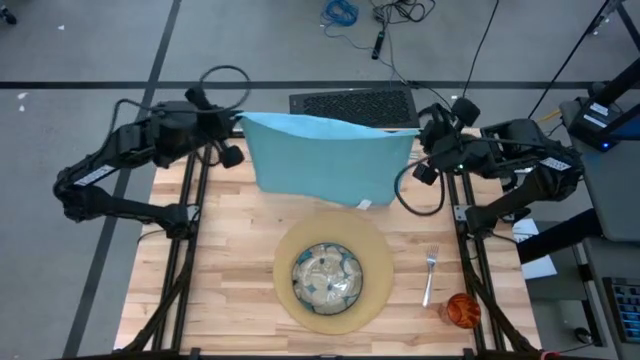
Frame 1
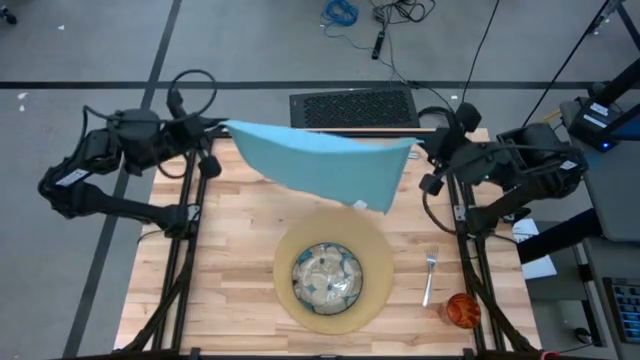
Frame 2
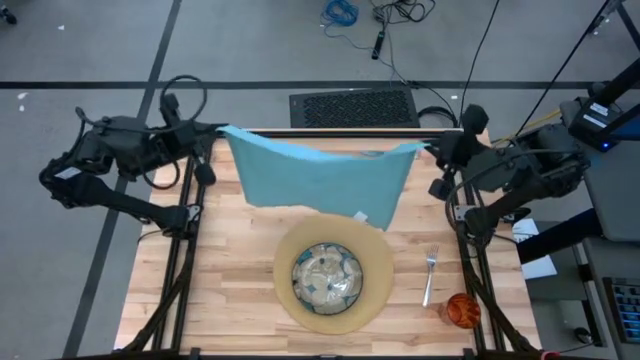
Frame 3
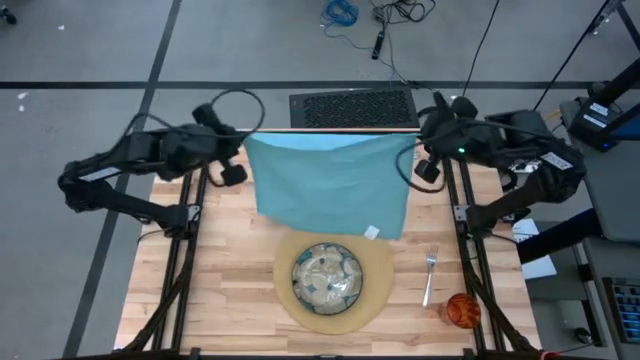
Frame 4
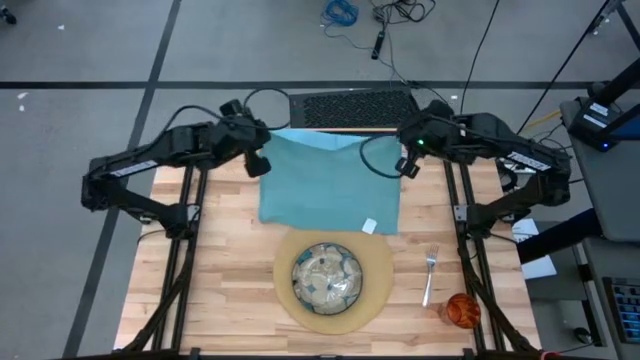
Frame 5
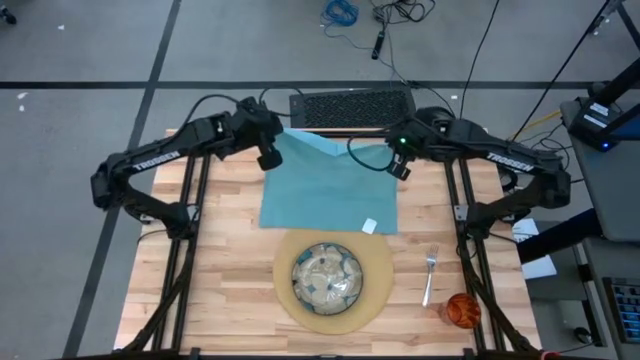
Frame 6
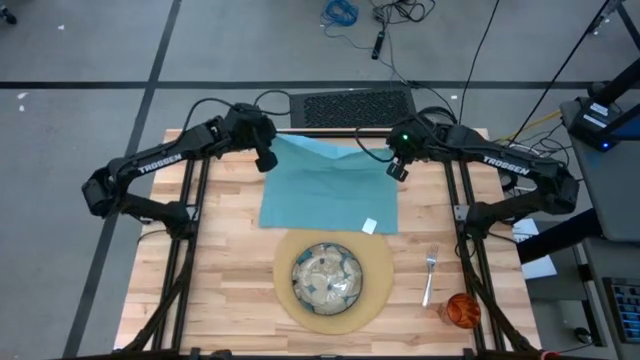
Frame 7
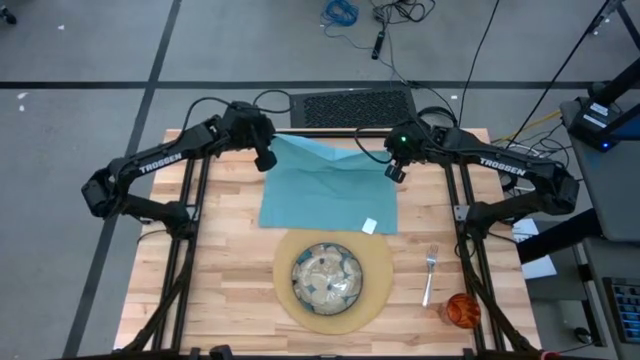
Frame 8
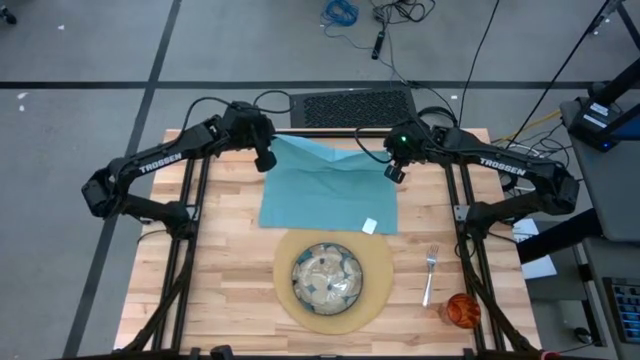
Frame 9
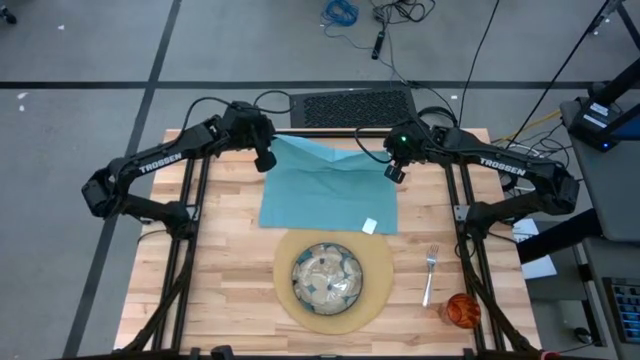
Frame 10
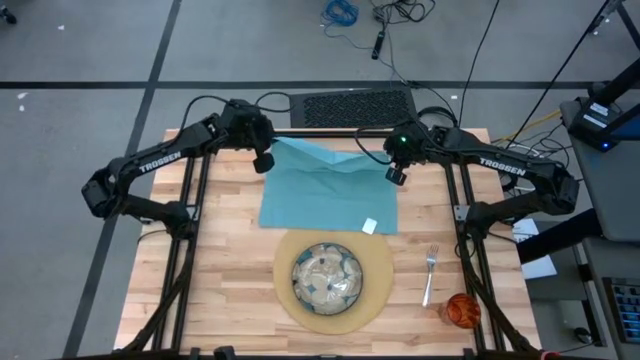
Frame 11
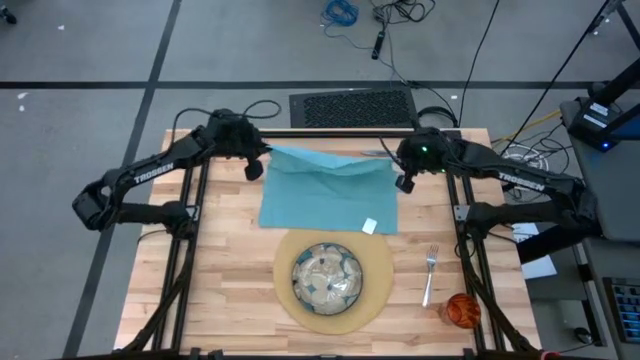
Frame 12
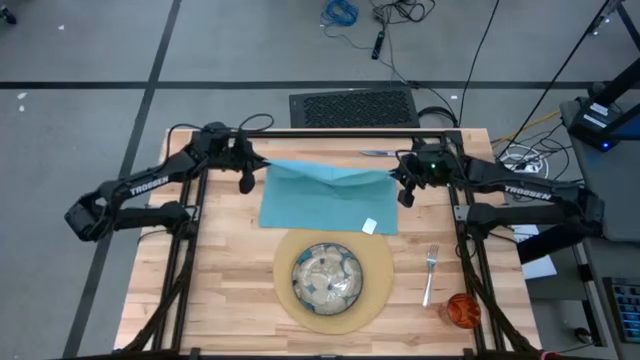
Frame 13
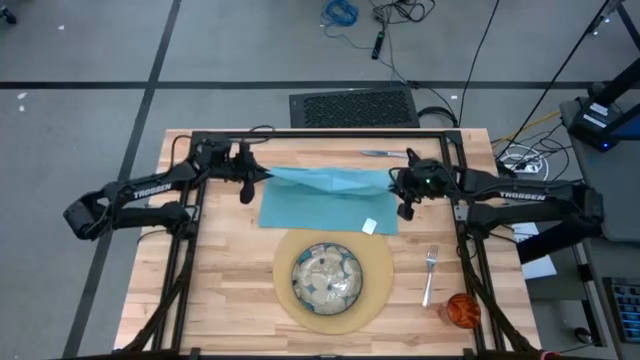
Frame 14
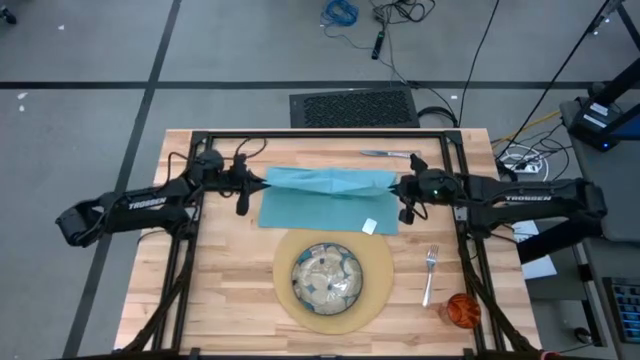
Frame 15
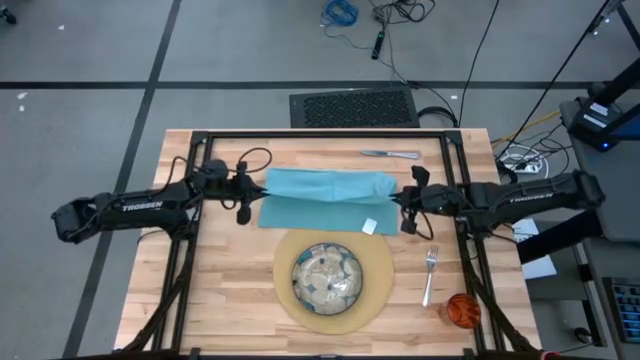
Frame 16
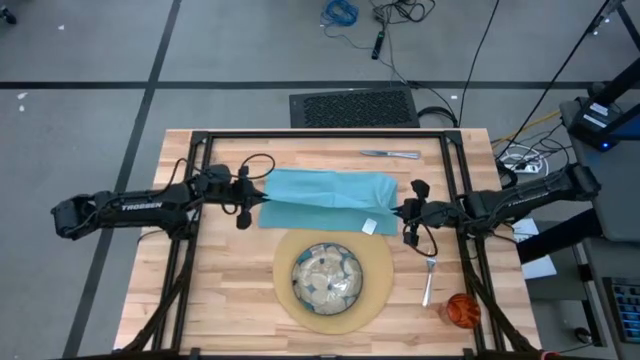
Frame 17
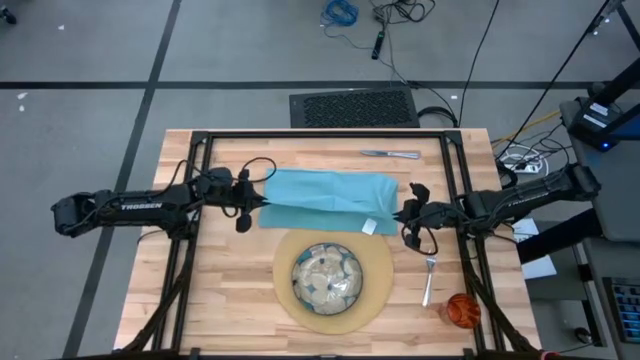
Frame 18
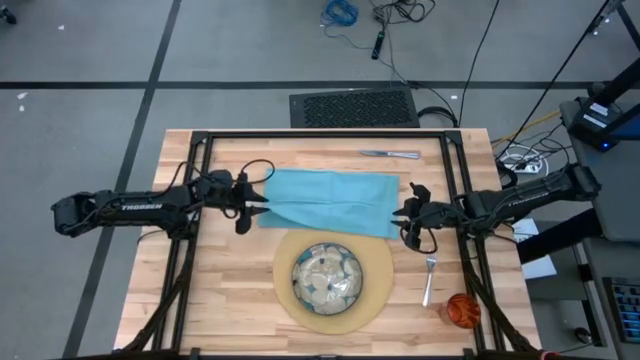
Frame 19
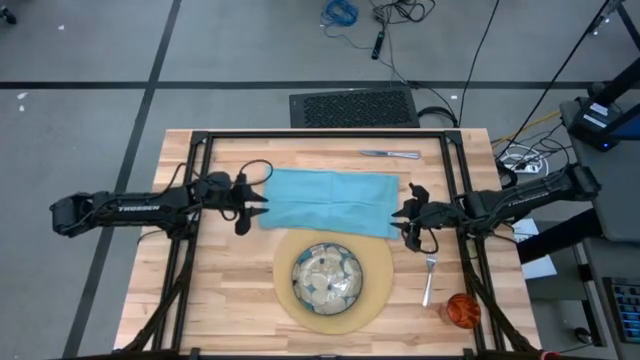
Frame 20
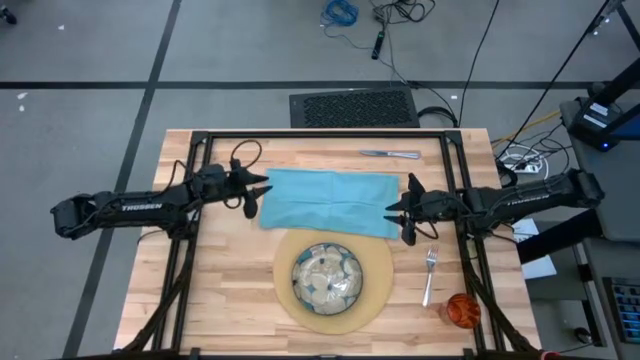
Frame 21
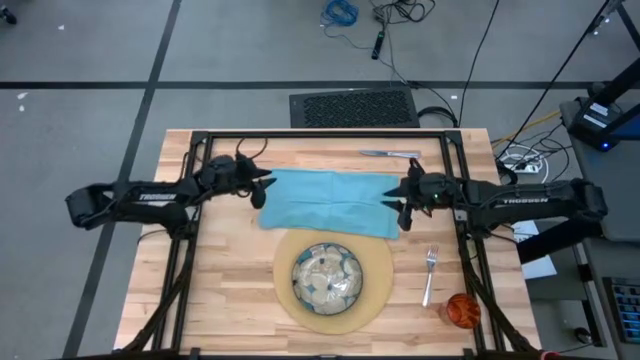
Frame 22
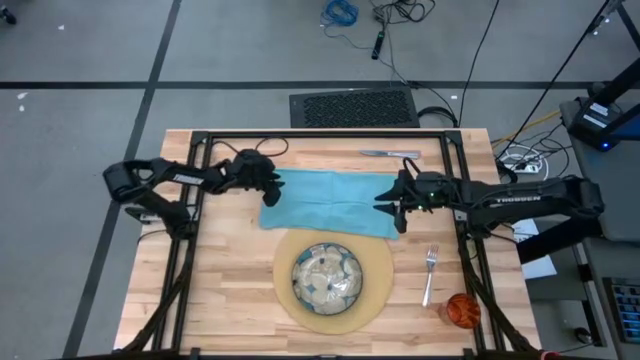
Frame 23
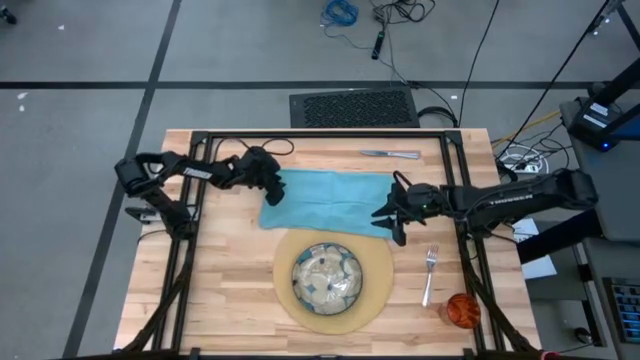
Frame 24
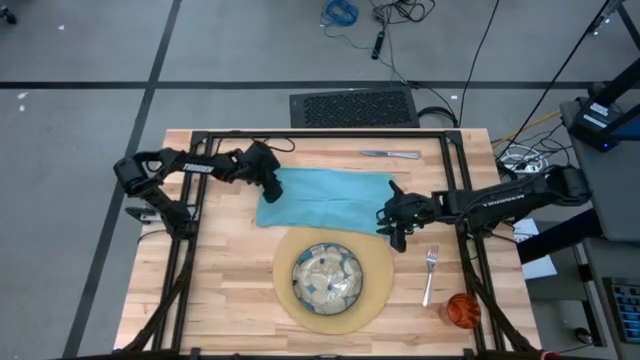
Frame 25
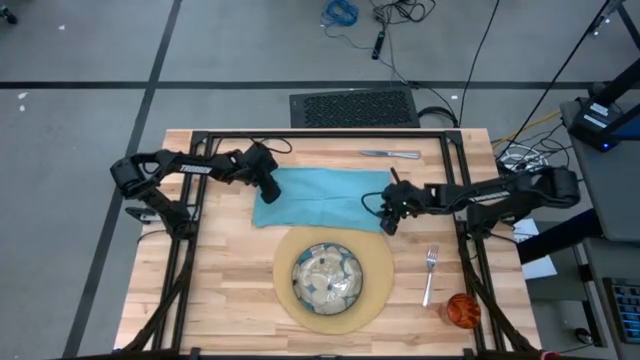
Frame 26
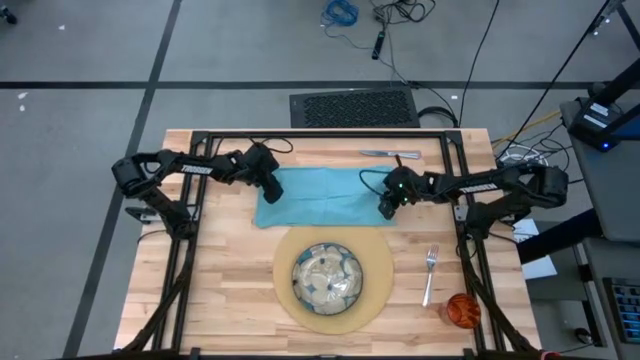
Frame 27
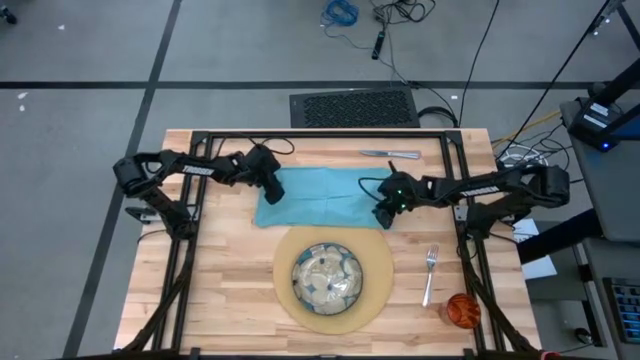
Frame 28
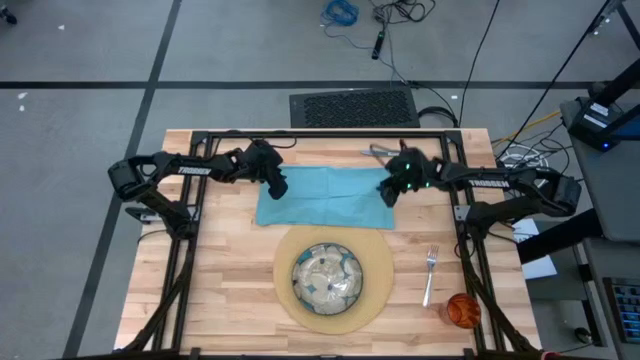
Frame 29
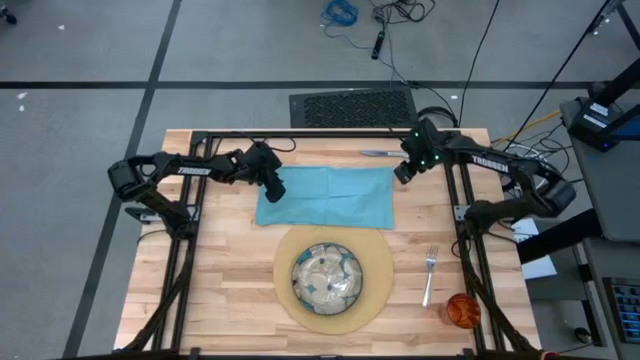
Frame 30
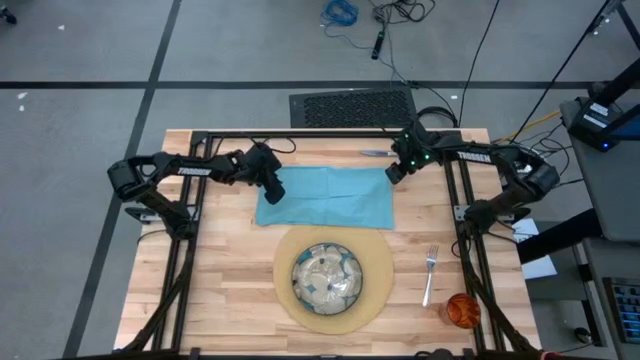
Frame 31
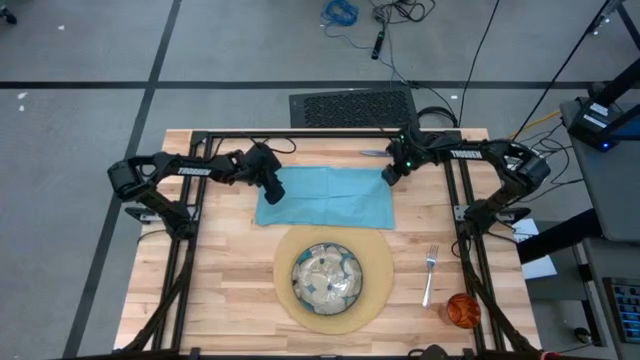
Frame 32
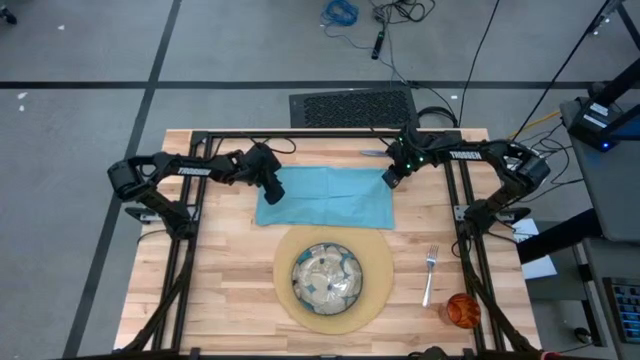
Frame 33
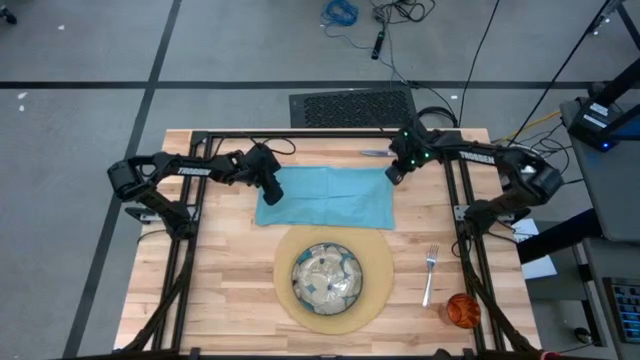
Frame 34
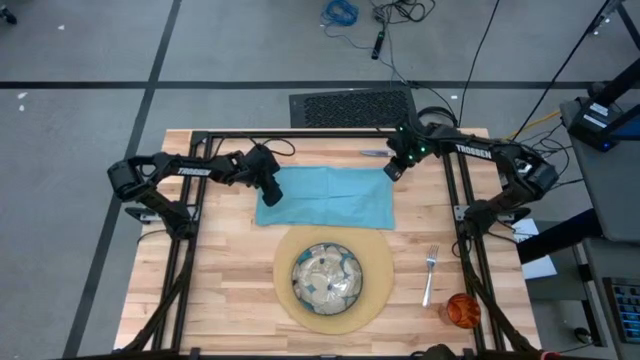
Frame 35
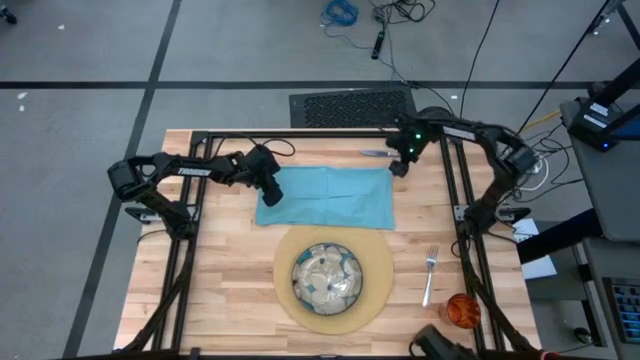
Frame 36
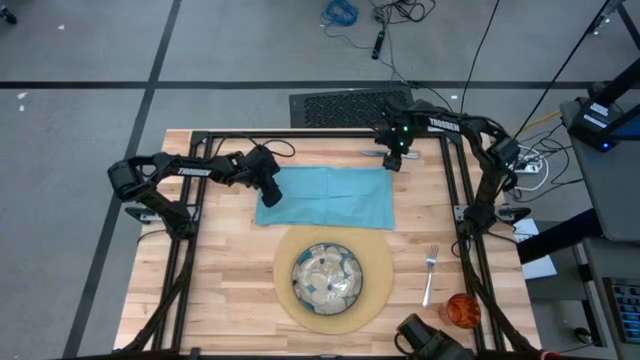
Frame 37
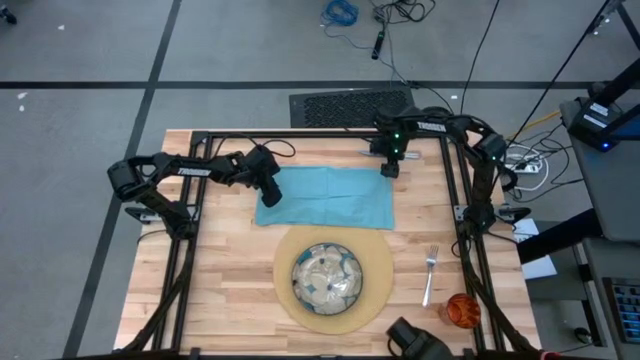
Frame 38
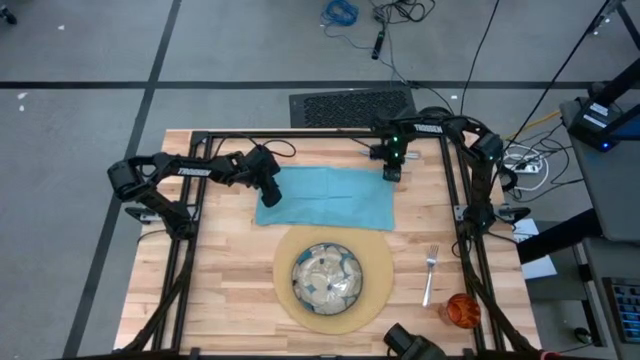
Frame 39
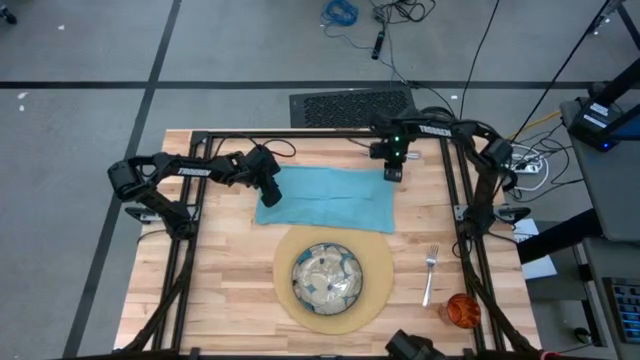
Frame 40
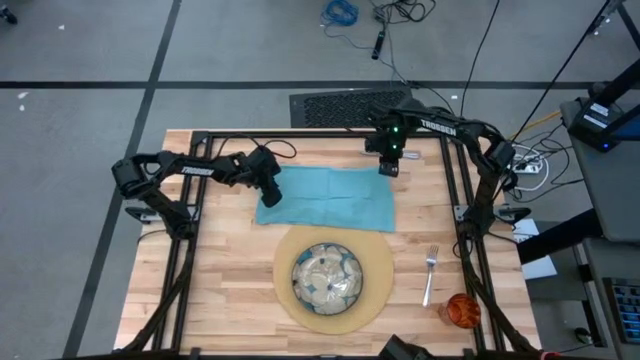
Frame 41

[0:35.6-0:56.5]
Task: Set table place
Fold the blue napkin
